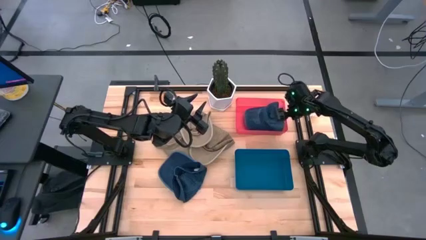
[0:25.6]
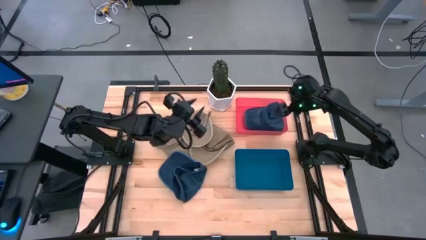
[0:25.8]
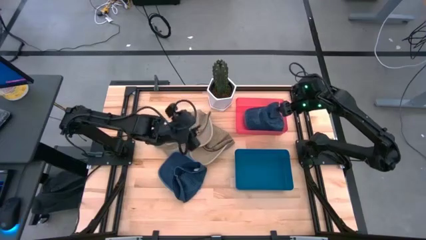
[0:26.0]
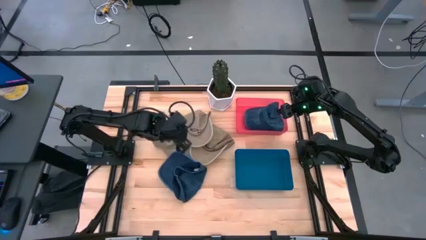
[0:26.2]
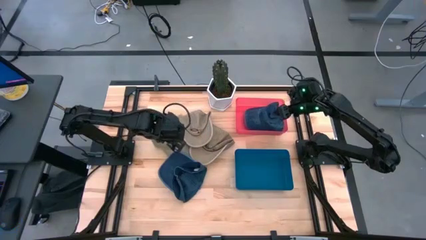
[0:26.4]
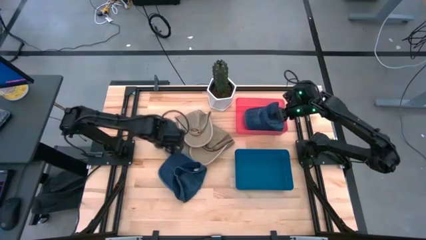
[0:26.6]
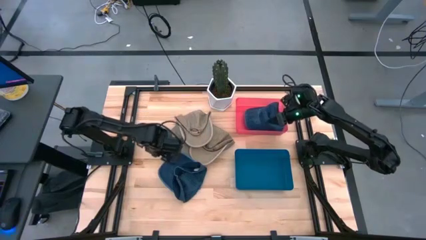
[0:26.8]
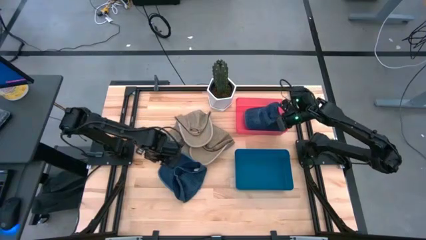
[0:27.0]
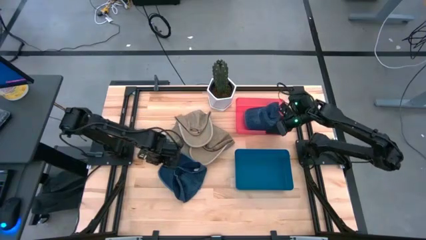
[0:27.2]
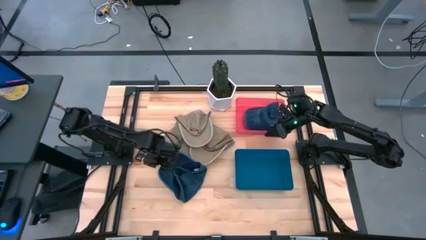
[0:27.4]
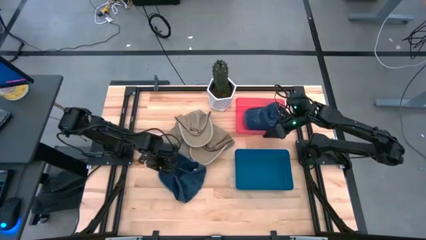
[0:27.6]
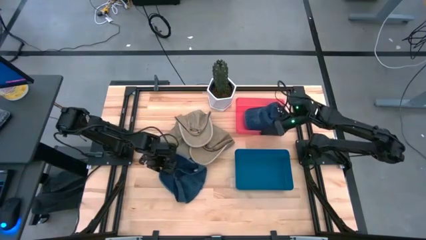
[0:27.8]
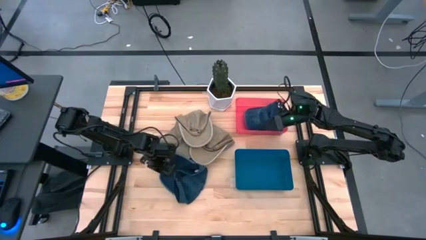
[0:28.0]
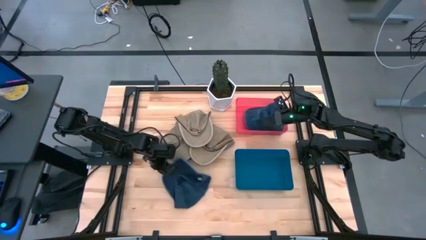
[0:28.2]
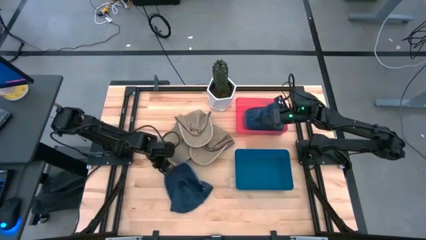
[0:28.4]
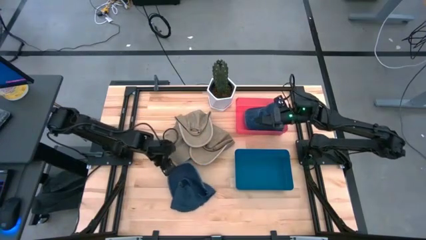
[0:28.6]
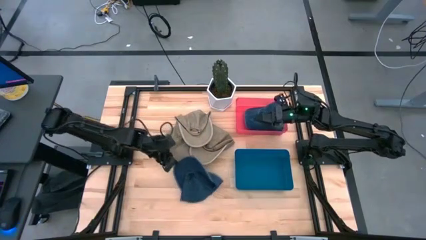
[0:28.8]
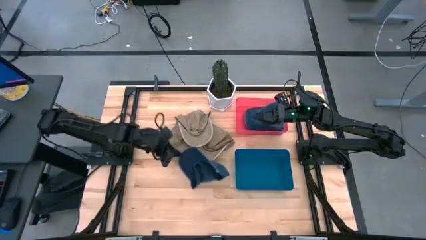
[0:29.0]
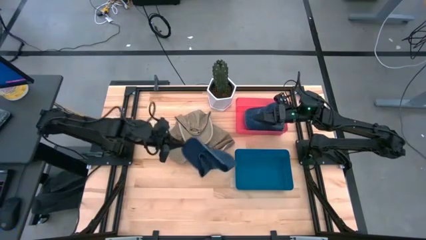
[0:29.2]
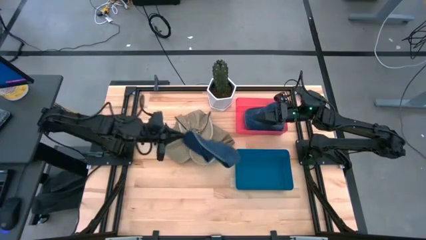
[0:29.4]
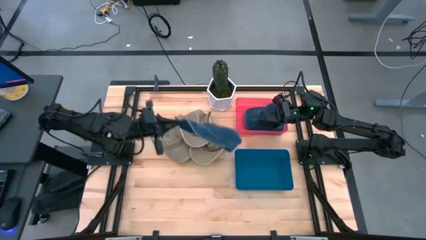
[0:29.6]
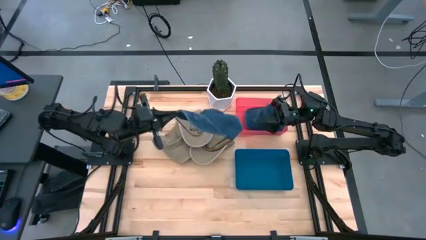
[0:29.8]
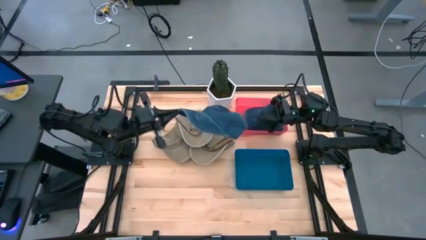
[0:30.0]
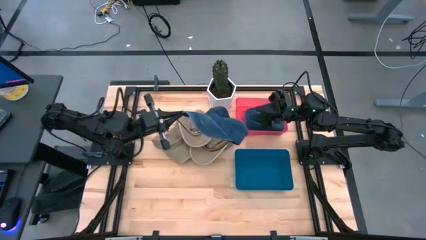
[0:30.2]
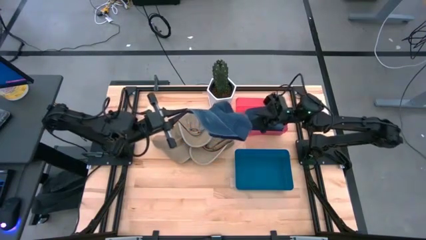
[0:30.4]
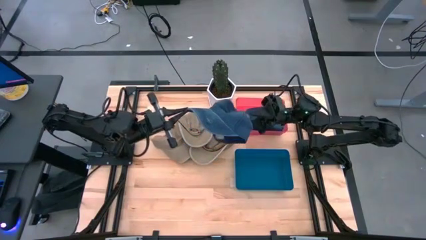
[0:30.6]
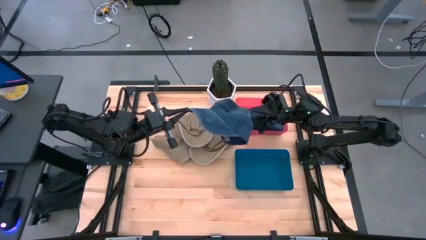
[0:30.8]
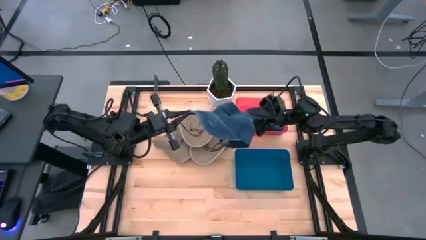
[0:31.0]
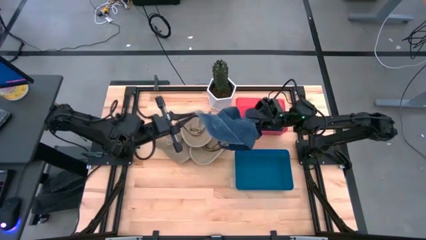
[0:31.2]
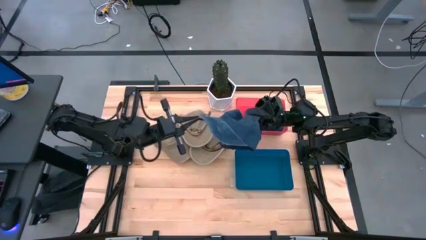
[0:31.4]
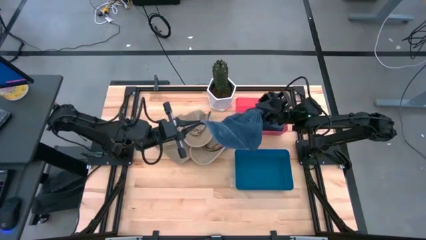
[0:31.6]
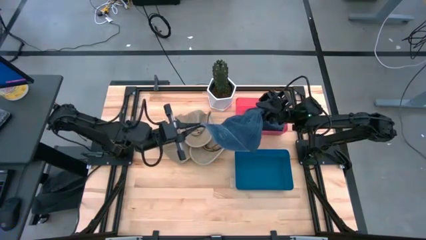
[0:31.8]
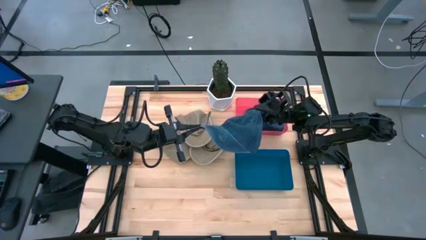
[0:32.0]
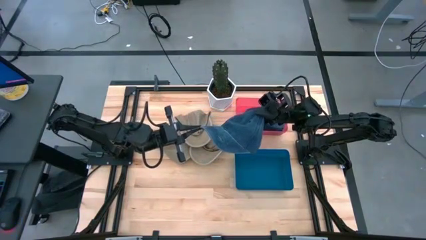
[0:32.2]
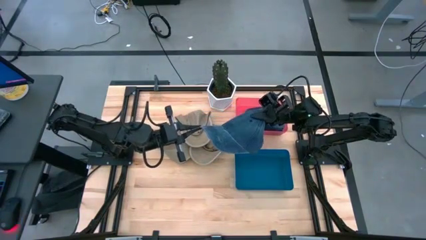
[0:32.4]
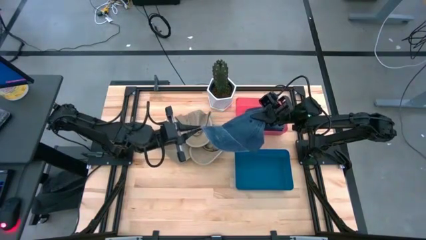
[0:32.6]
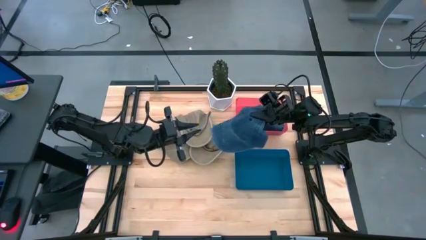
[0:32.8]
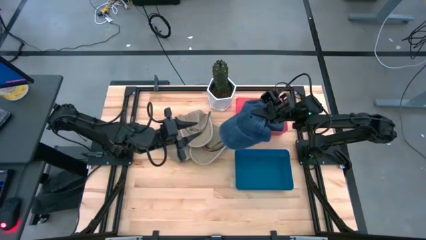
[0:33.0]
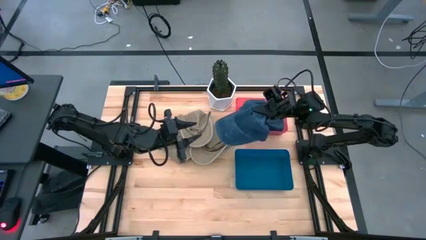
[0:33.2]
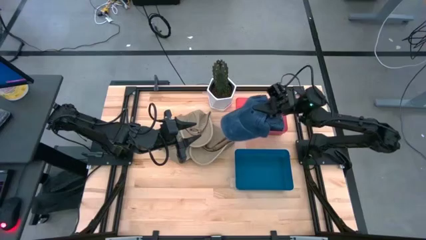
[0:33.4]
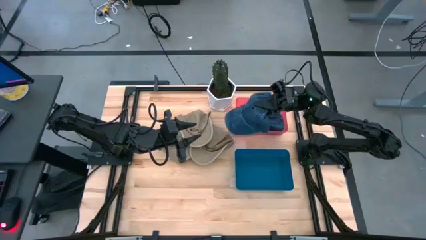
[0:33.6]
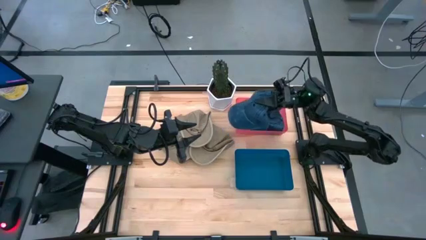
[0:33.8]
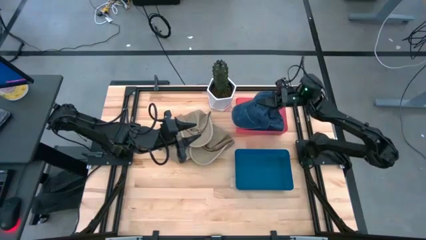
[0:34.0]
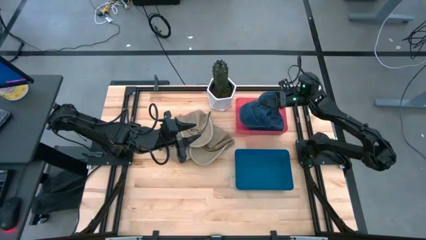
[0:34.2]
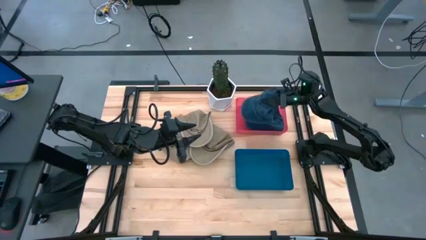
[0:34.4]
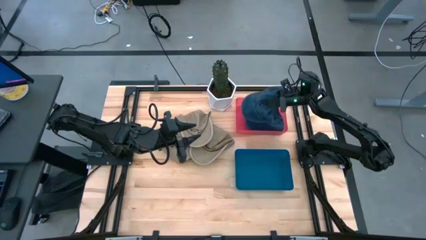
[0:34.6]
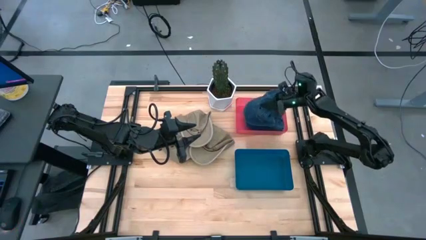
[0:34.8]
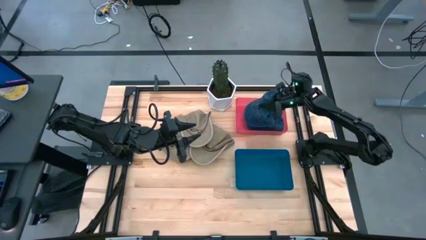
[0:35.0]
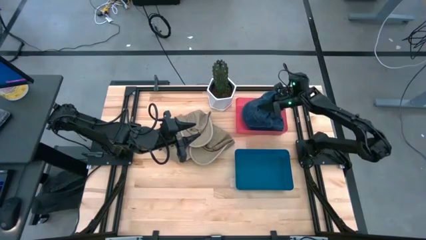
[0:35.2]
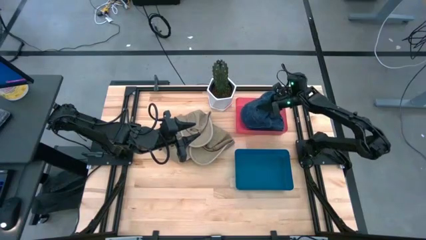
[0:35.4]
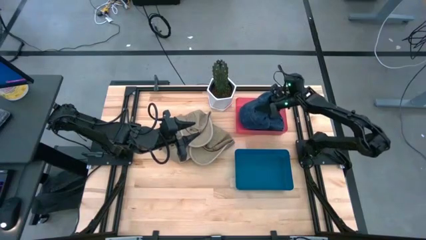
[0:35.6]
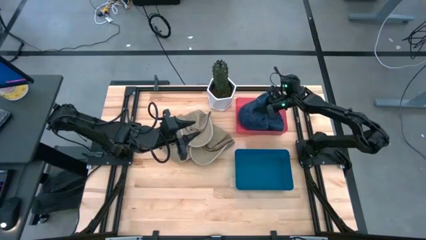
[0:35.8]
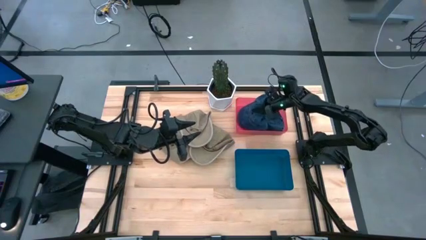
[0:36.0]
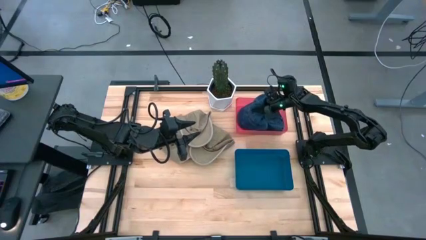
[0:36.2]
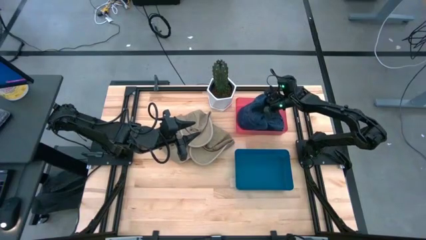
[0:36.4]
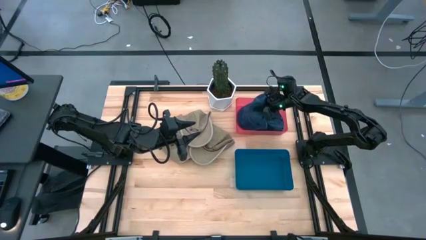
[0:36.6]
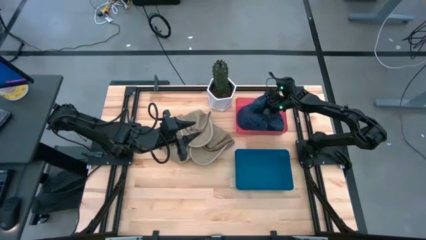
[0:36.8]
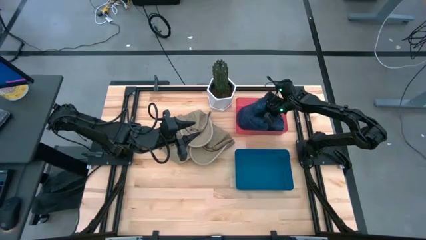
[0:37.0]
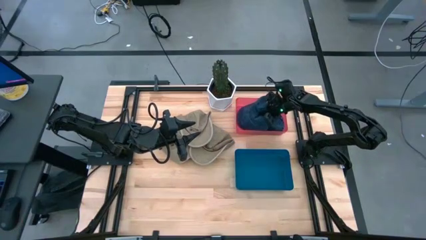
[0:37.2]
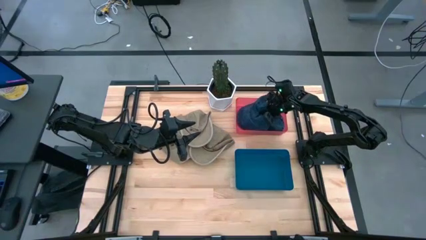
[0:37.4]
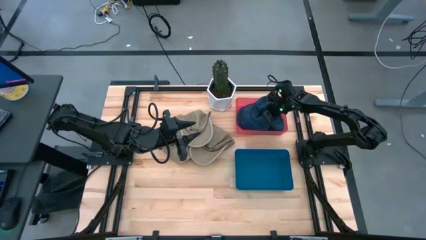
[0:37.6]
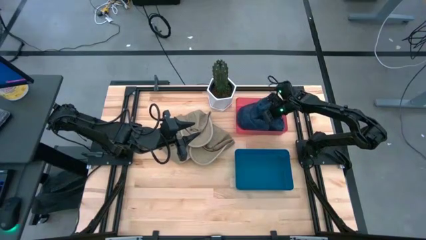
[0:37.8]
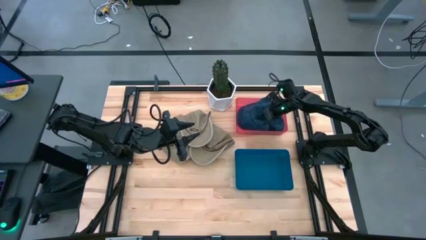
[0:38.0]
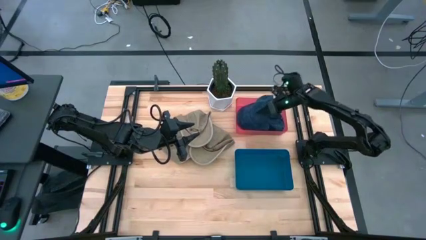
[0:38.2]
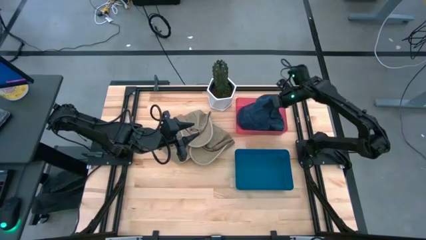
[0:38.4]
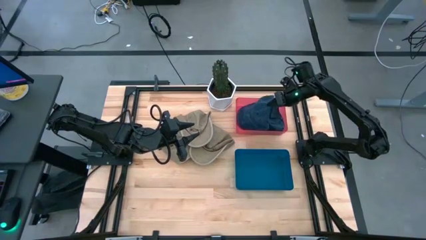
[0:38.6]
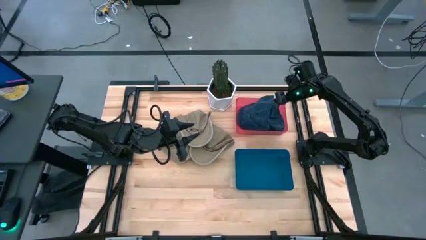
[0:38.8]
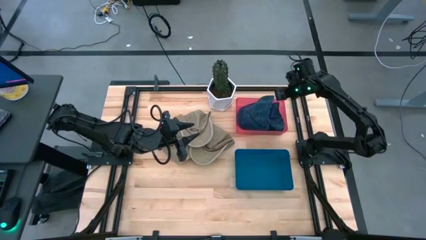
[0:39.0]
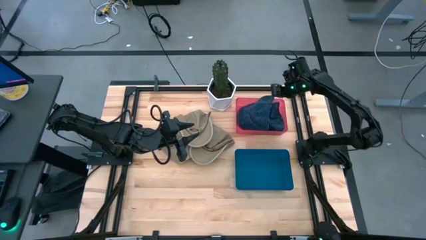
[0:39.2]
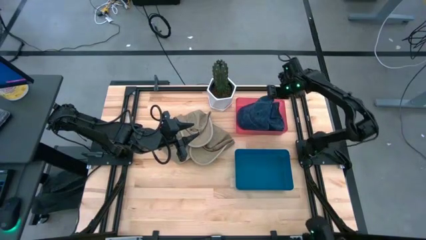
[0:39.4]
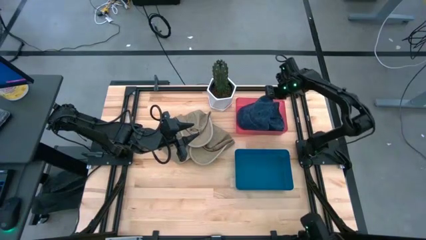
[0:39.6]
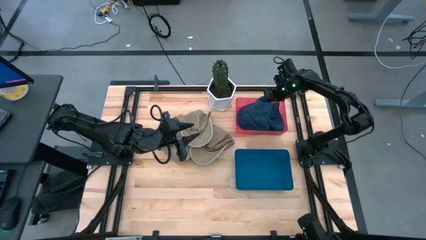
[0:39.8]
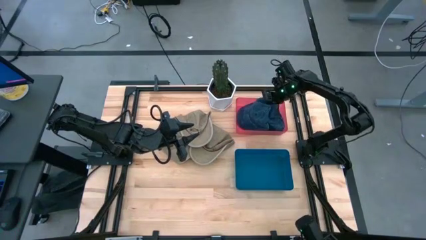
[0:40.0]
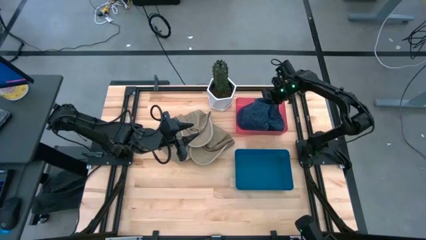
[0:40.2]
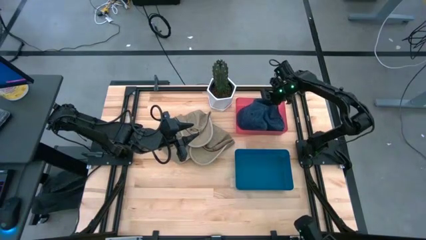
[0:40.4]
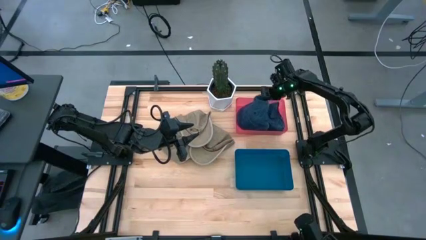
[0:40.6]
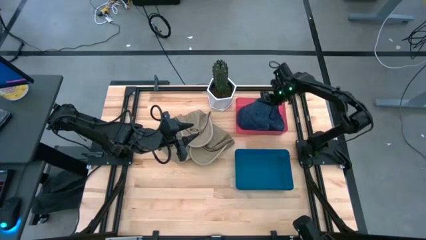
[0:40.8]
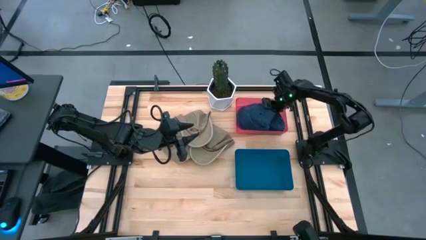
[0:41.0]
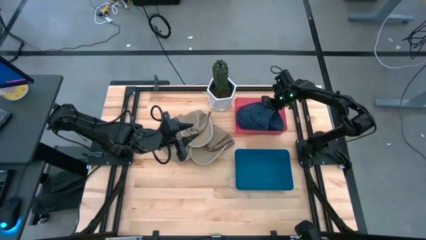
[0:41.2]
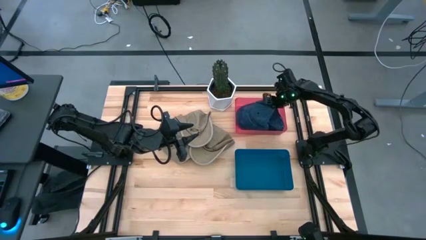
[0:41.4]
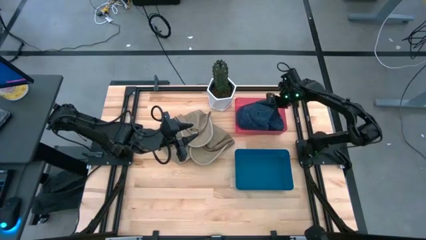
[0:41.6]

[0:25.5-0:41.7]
Task: Pick & Place hat
Put the blue cap into the pink bin
